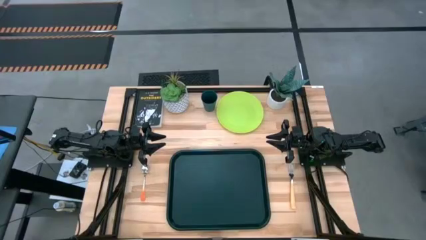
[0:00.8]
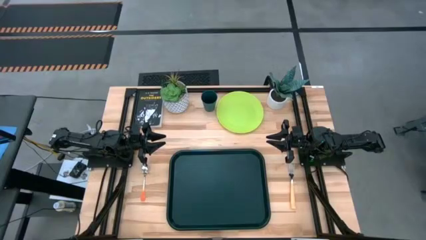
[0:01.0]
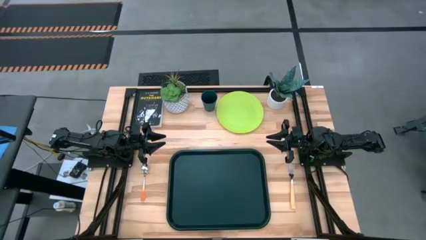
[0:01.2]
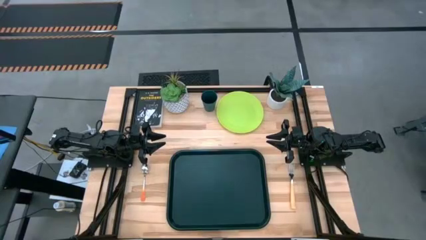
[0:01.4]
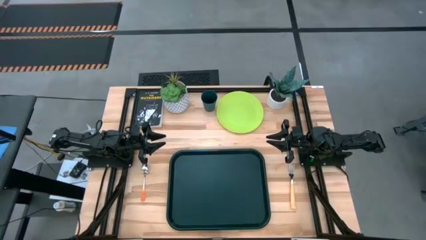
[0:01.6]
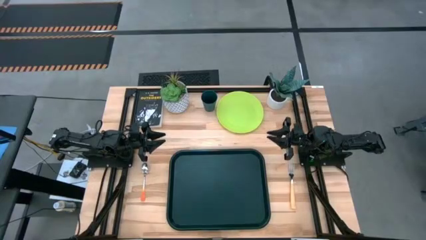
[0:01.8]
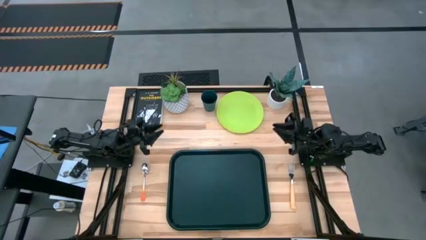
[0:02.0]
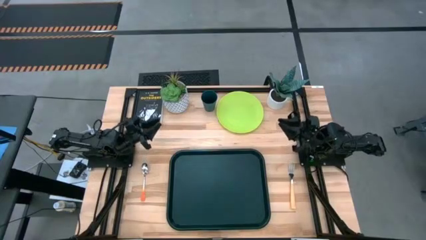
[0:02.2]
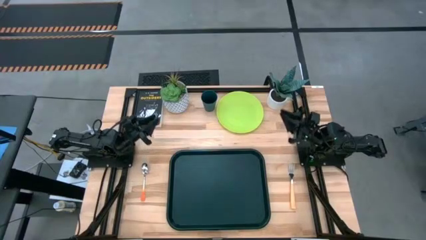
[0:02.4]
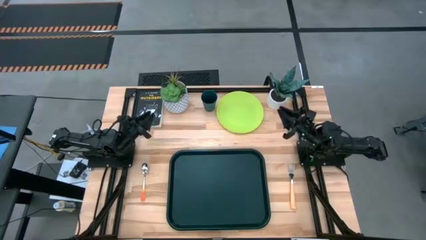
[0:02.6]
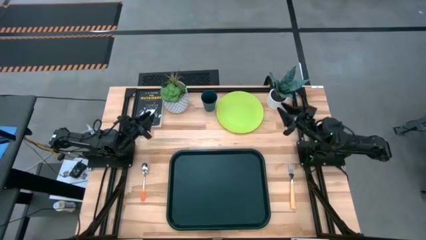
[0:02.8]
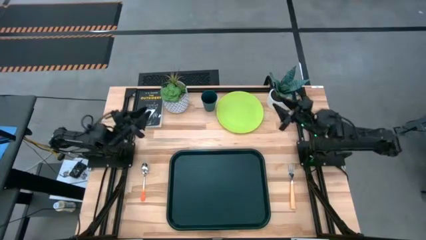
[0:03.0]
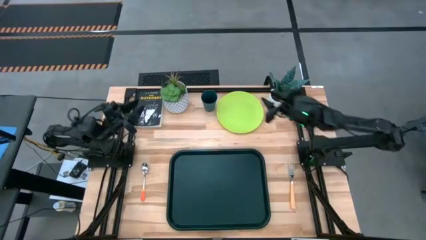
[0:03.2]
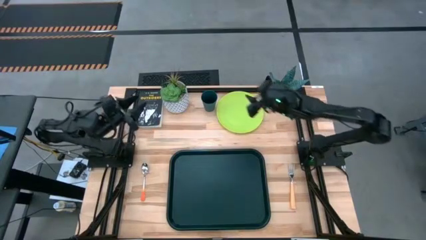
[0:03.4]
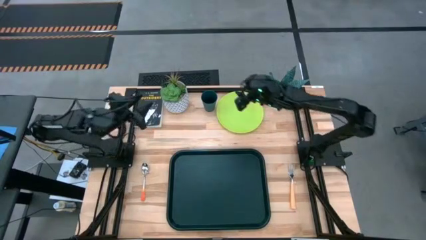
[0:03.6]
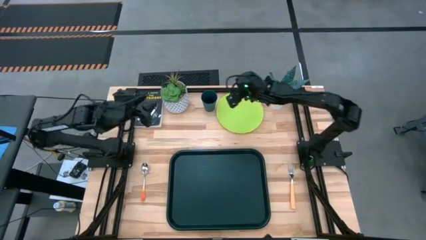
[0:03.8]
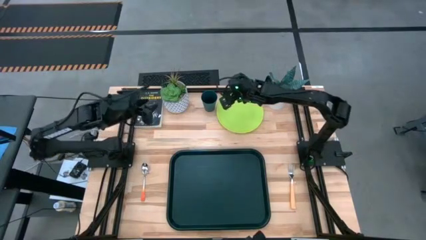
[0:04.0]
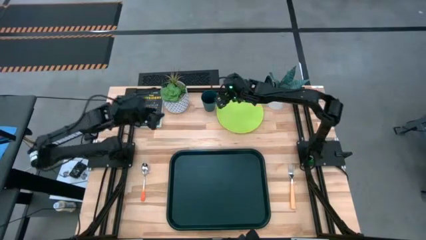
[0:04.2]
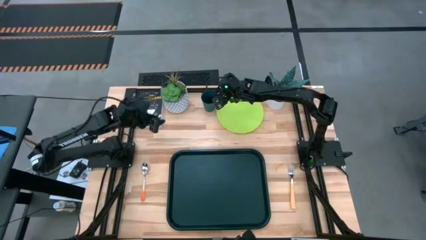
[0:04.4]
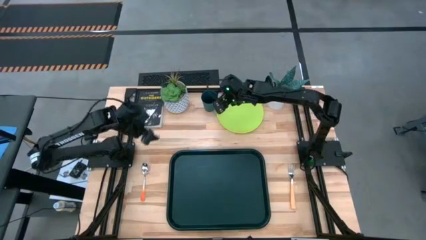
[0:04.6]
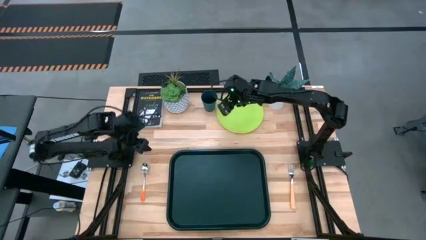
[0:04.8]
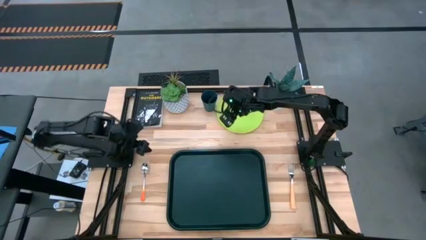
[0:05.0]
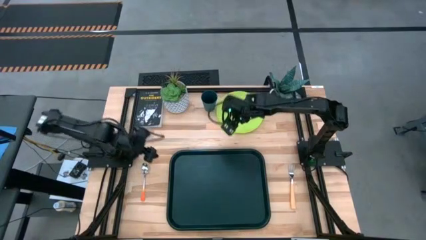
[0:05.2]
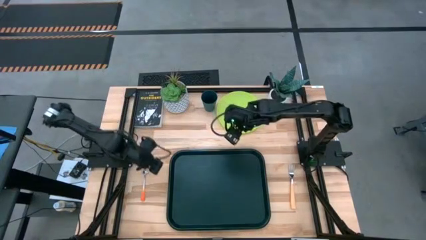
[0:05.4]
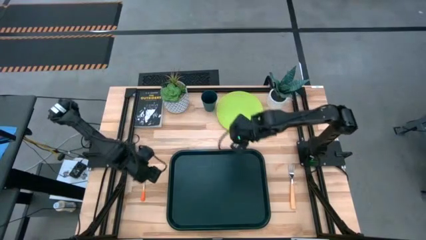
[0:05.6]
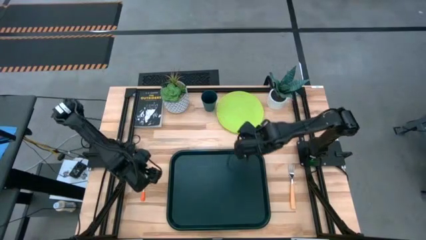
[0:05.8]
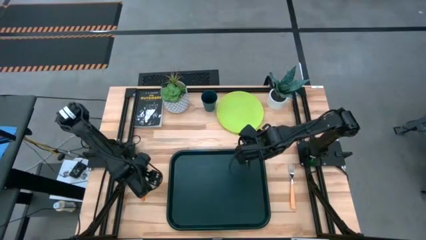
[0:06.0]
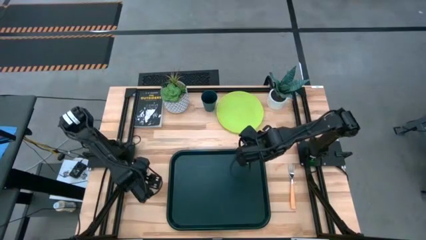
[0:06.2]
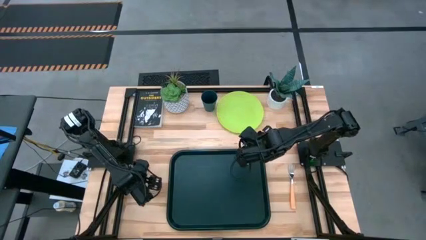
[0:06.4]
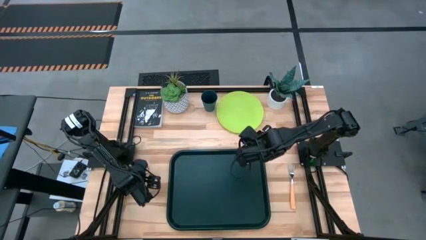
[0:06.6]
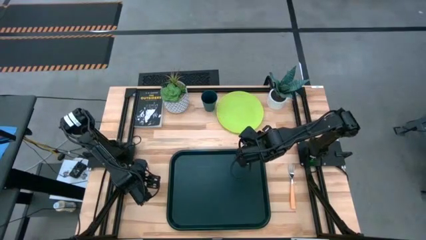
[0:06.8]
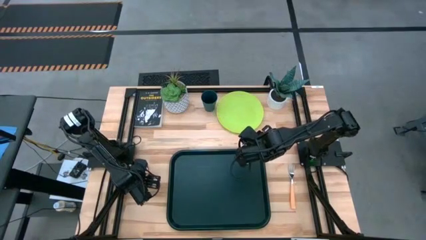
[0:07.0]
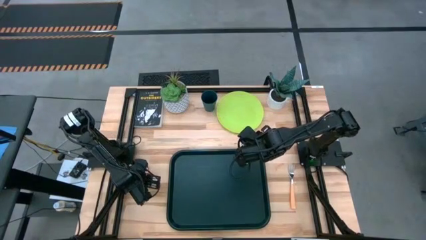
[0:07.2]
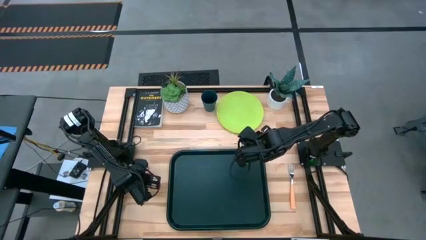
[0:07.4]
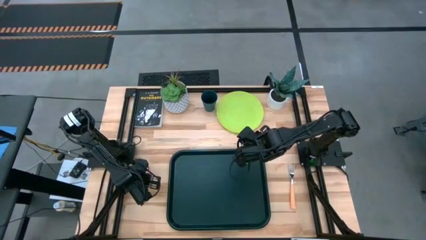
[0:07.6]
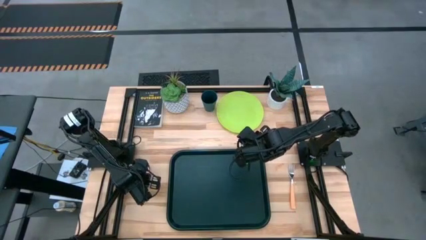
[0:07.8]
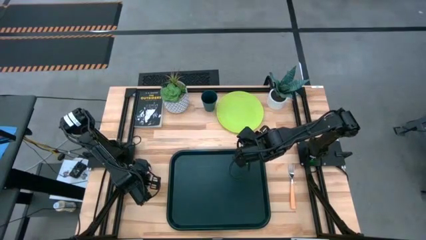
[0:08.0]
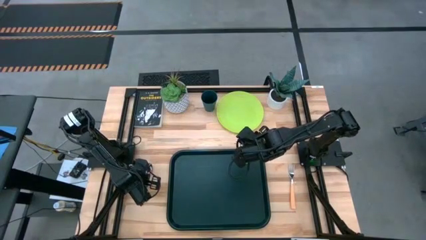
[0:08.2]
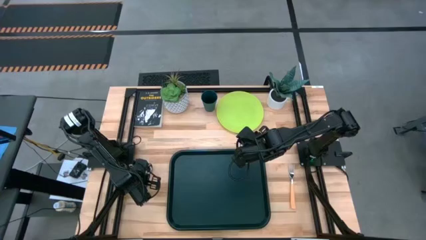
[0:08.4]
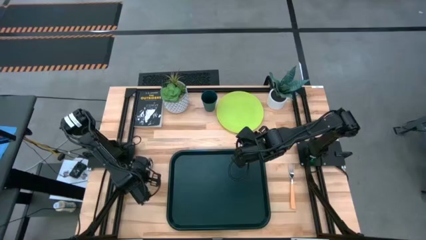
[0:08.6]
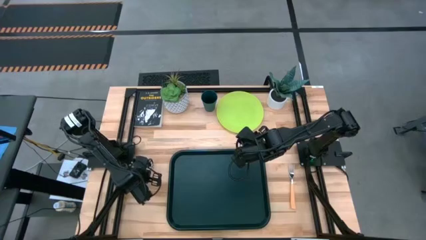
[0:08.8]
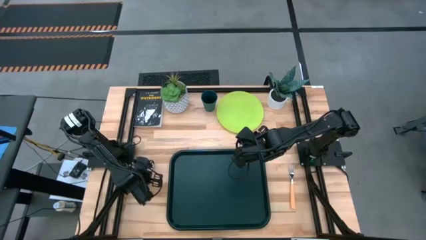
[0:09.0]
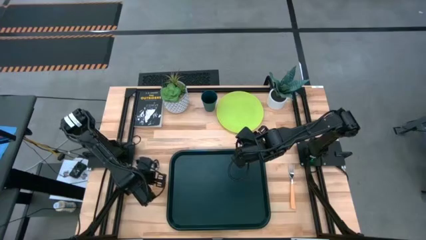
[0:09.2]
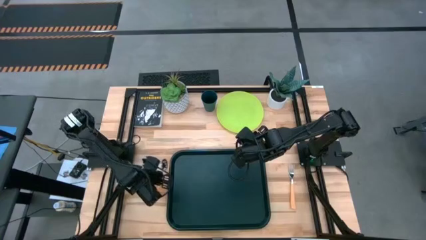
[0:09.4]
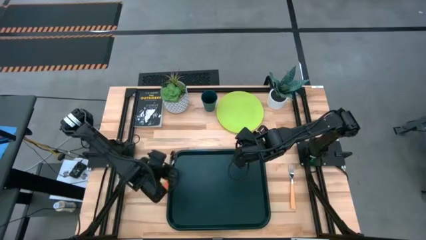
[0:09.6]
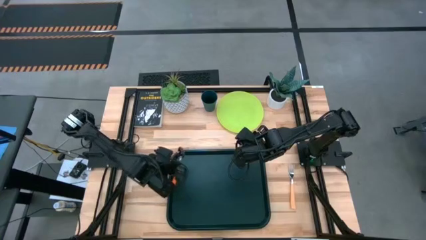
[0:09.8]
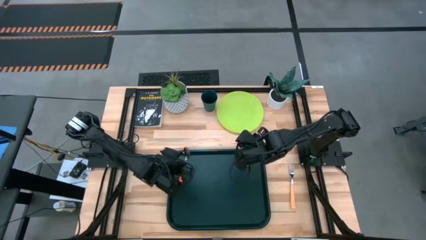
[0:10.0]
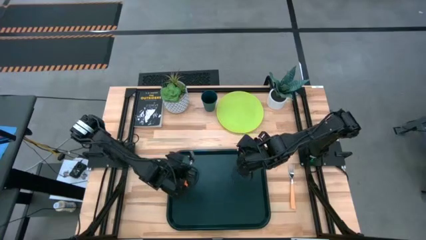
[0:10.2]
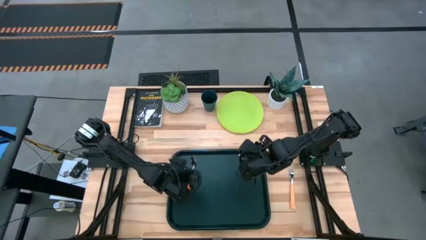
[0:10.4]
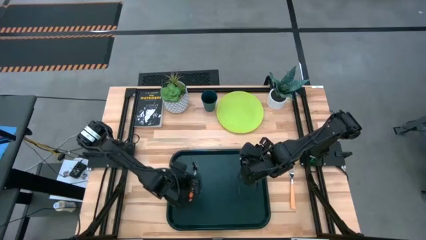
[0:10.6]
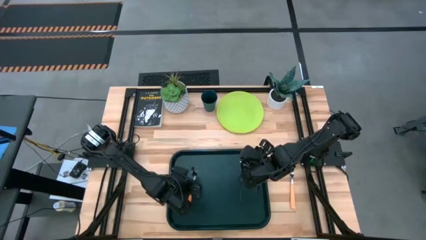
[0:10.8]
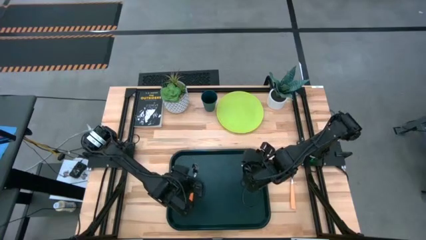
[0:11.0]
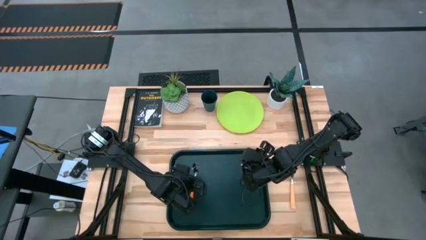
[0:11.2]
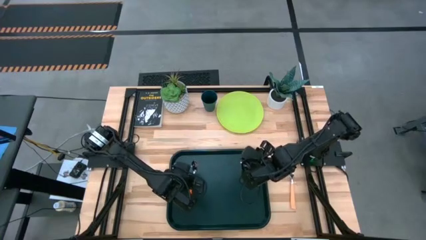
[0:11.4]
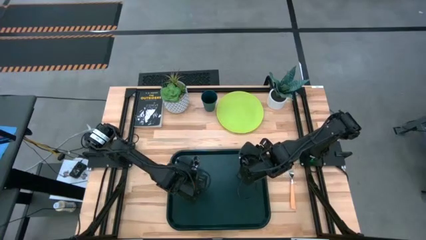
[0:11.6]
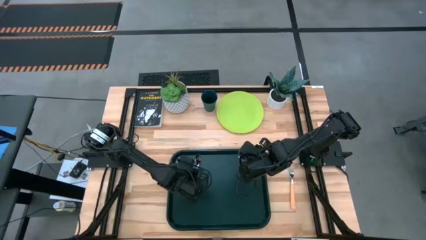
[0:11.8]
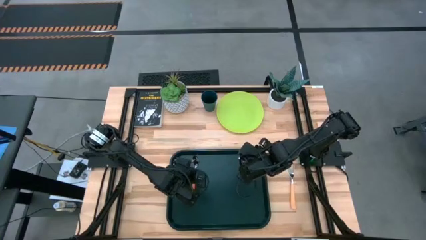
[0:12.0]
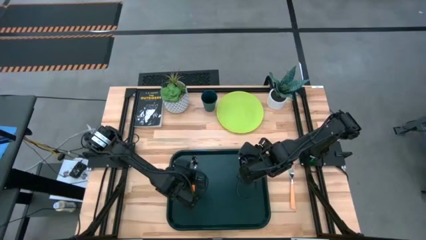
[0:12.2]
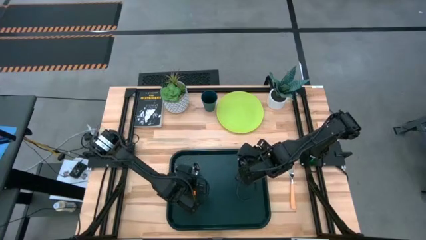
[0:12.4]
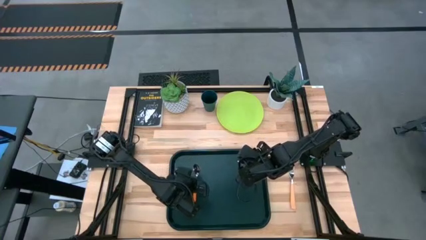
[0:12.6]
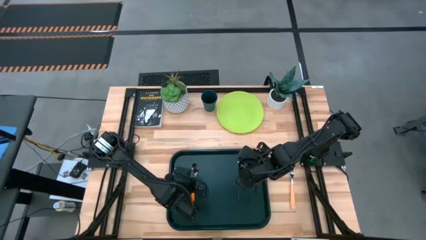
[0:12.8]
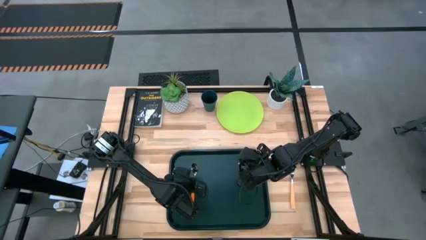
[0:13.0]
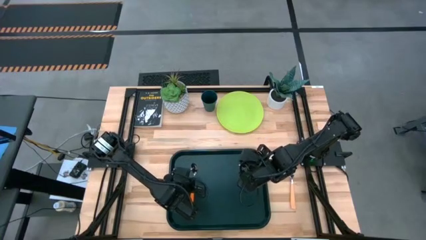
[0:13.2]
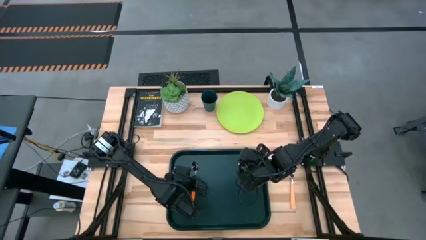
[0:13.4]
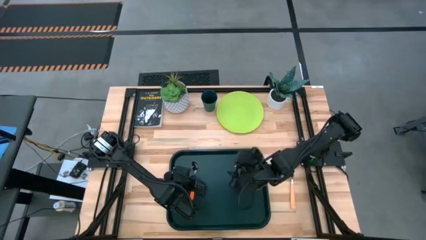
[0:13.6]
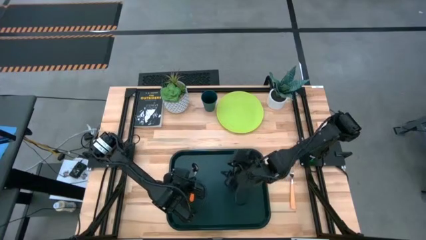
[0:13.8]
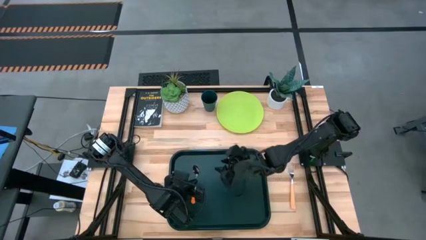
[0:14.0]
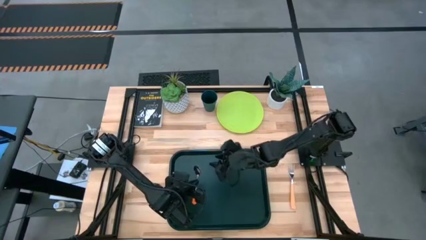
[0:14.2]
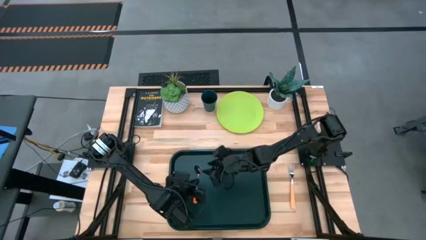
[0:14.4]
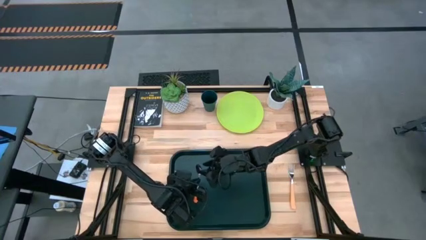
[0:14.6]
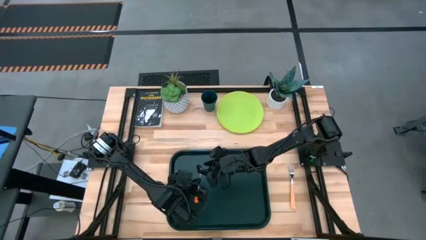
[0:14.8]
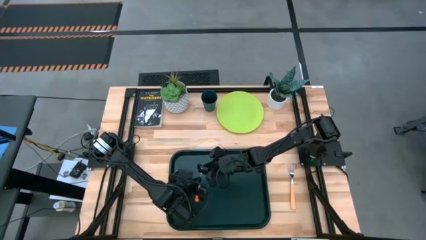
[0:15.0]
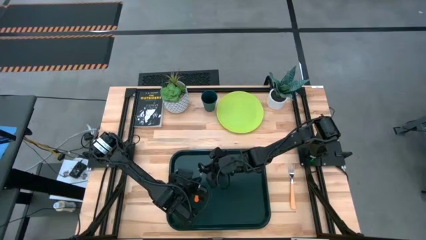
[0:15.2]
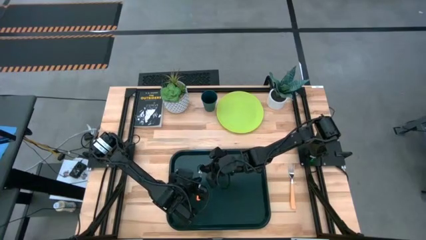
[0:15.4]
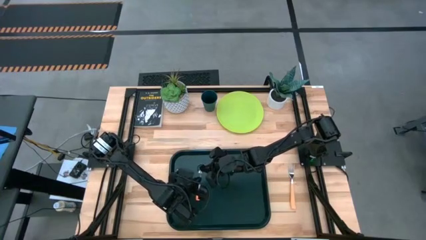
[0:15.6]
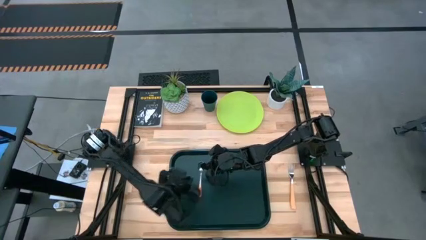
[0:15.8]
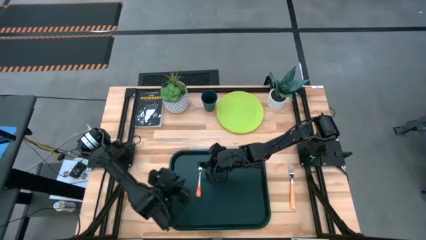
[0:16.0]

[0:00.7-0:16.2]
Task: Pick and place plate/cup/fork/spoon on tray
Put the orange spoon on the left side of the black serving tray
